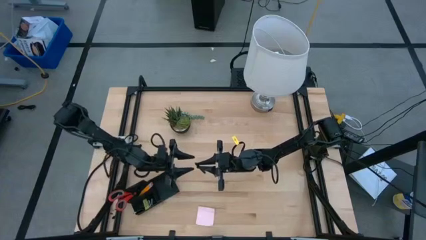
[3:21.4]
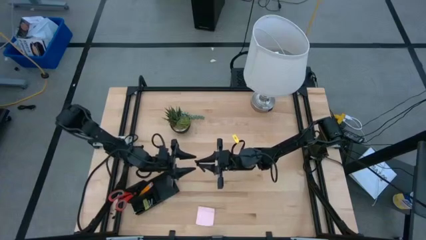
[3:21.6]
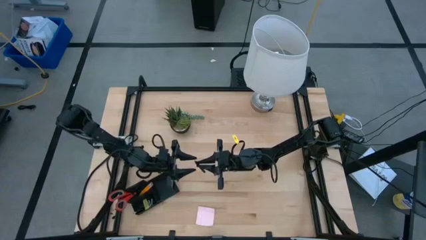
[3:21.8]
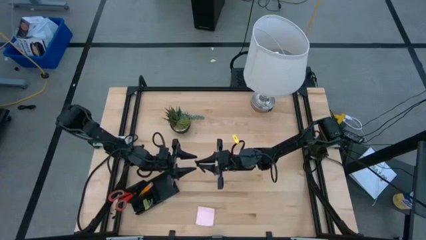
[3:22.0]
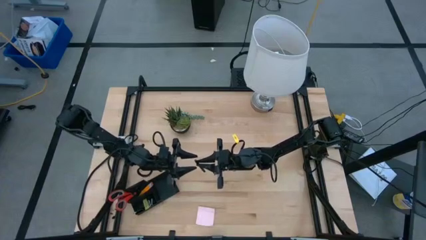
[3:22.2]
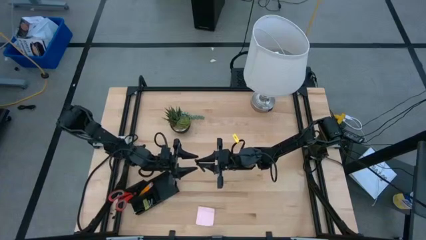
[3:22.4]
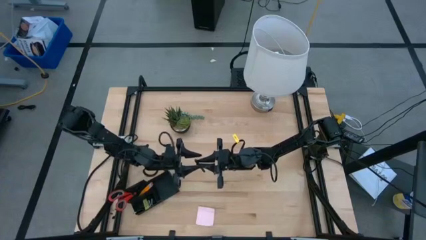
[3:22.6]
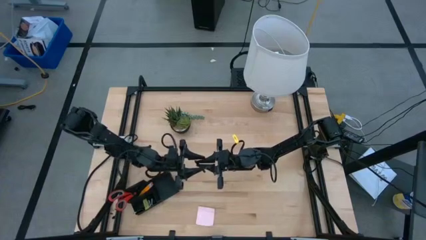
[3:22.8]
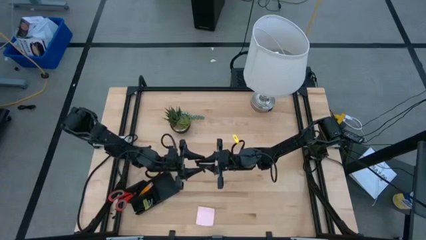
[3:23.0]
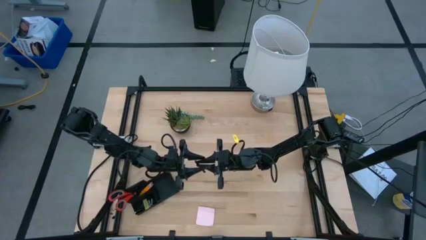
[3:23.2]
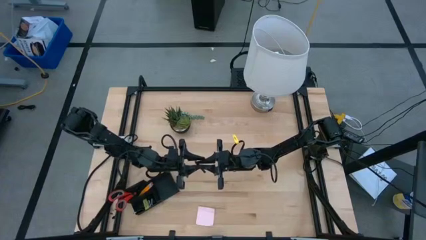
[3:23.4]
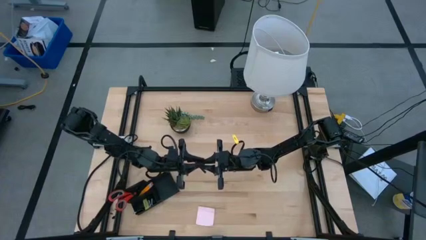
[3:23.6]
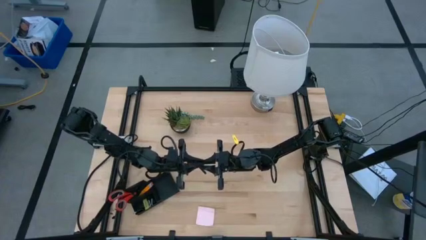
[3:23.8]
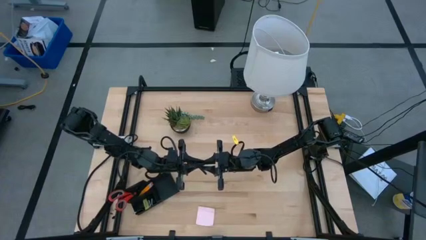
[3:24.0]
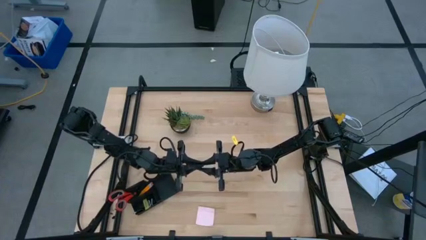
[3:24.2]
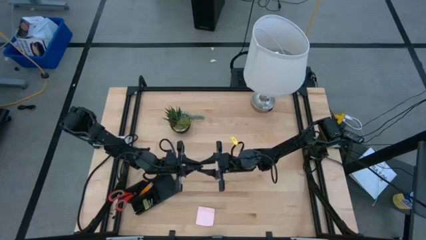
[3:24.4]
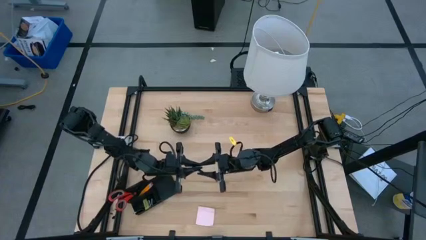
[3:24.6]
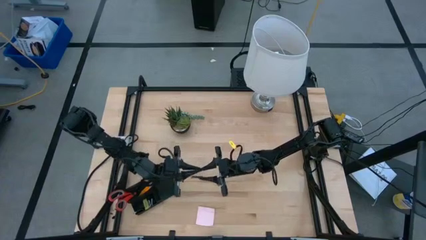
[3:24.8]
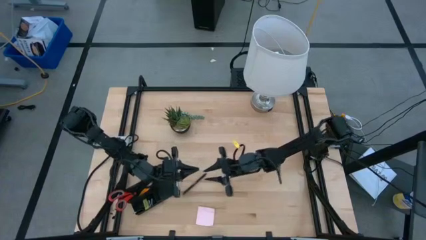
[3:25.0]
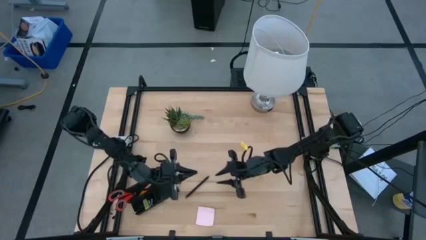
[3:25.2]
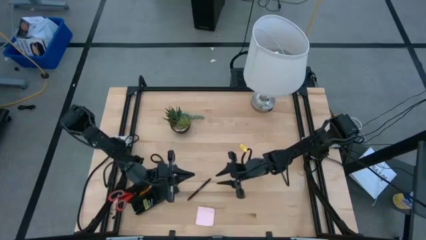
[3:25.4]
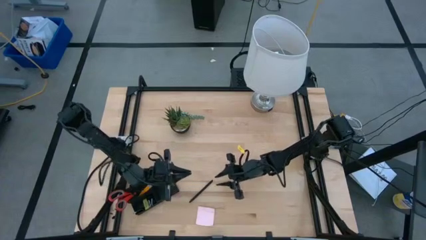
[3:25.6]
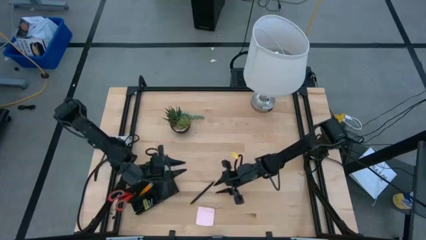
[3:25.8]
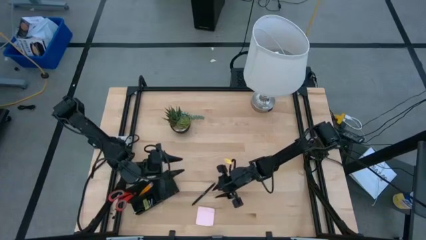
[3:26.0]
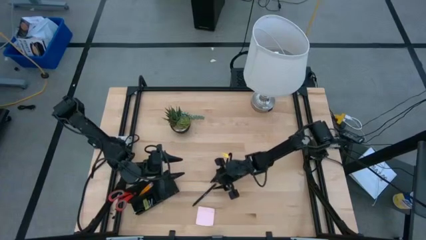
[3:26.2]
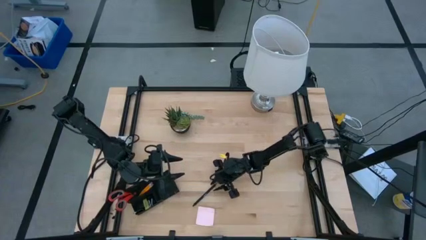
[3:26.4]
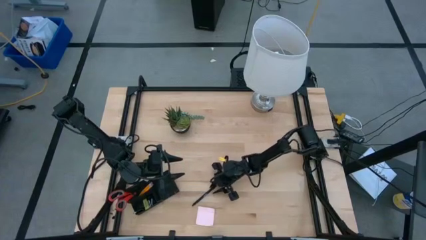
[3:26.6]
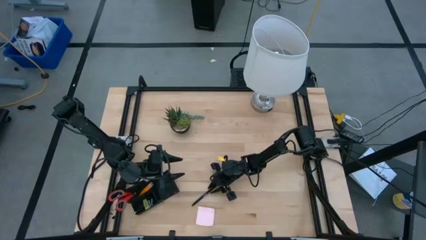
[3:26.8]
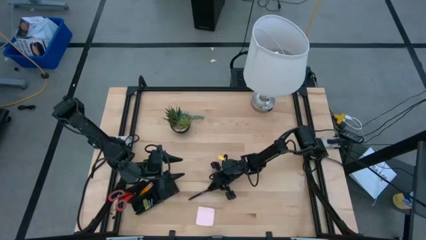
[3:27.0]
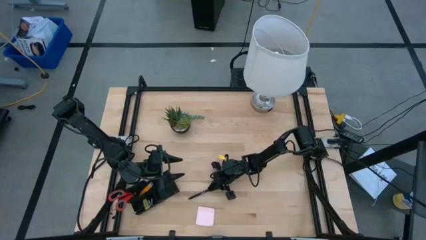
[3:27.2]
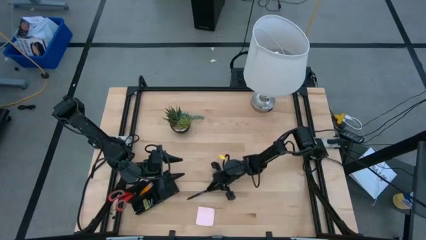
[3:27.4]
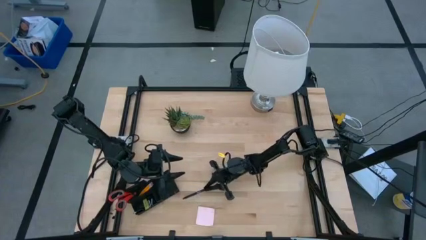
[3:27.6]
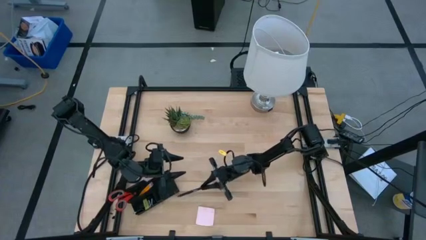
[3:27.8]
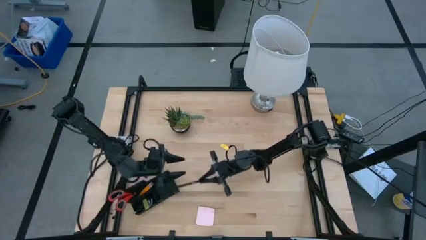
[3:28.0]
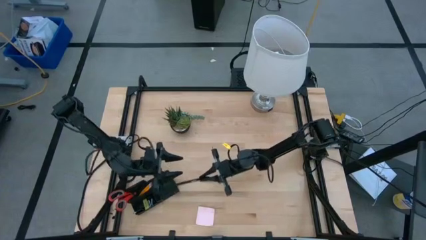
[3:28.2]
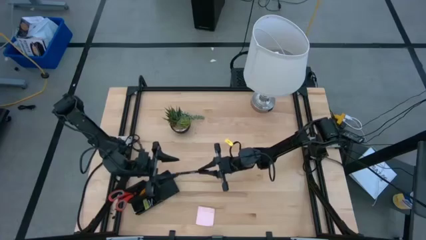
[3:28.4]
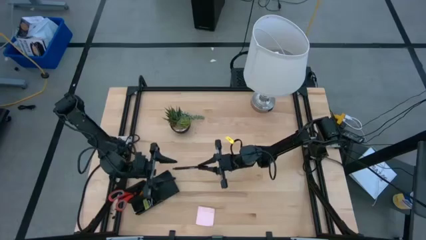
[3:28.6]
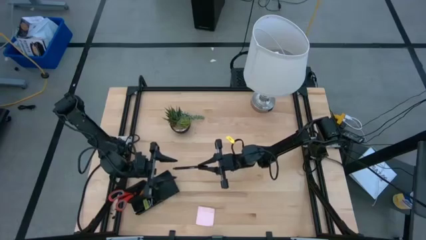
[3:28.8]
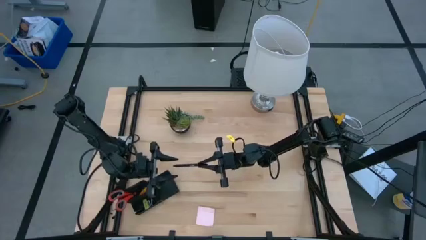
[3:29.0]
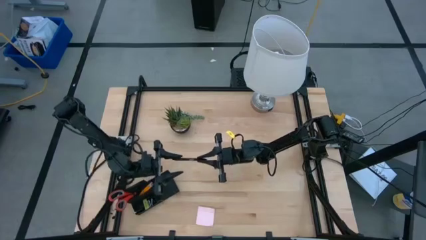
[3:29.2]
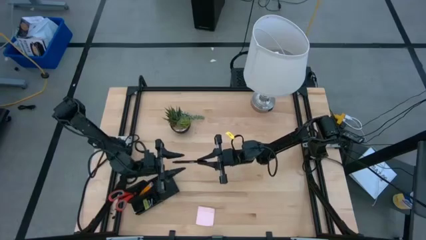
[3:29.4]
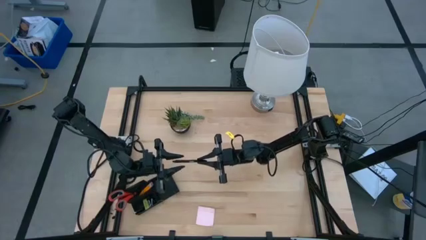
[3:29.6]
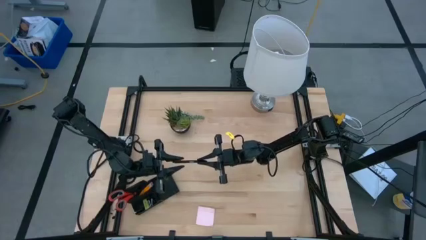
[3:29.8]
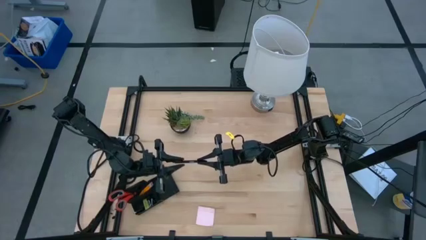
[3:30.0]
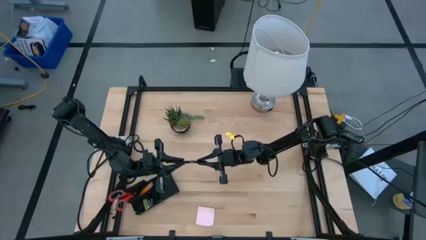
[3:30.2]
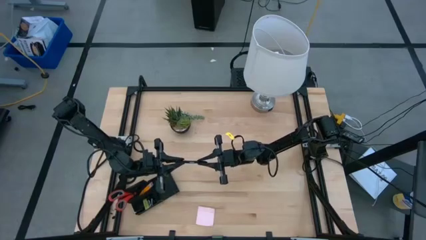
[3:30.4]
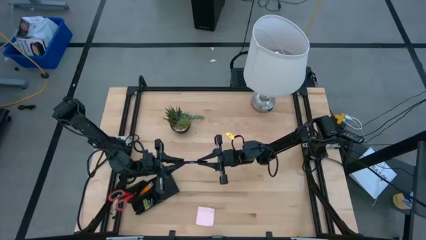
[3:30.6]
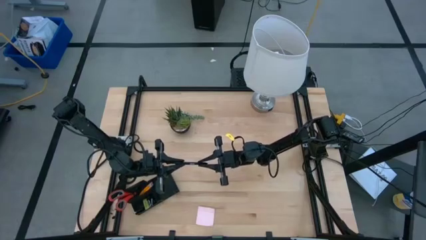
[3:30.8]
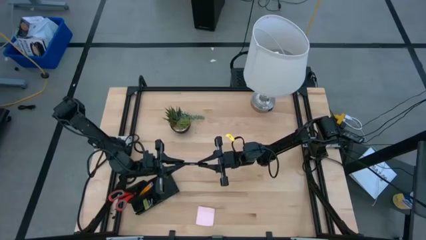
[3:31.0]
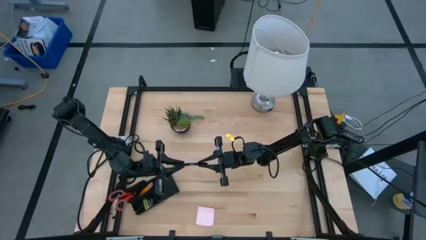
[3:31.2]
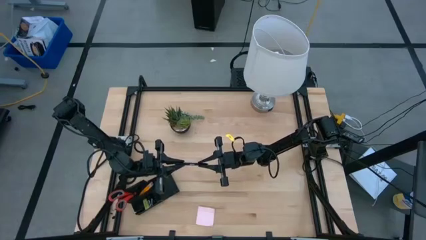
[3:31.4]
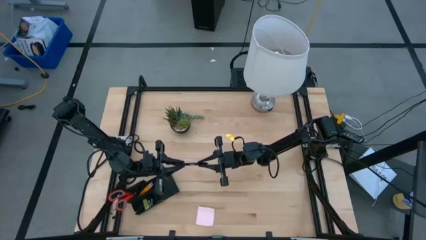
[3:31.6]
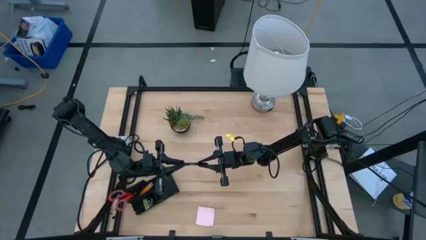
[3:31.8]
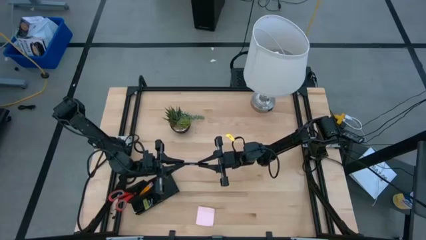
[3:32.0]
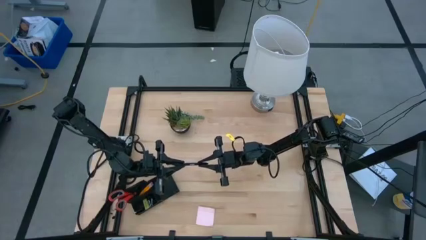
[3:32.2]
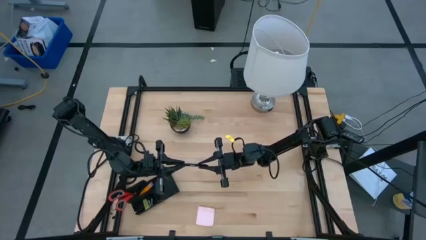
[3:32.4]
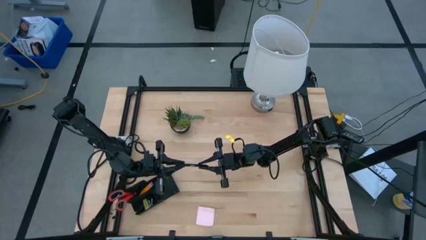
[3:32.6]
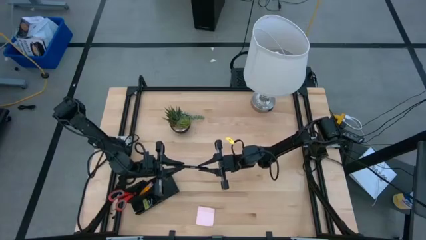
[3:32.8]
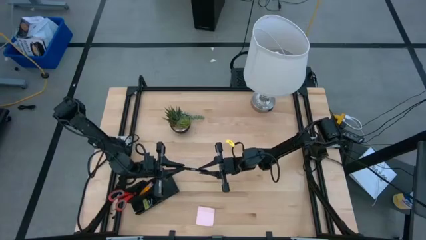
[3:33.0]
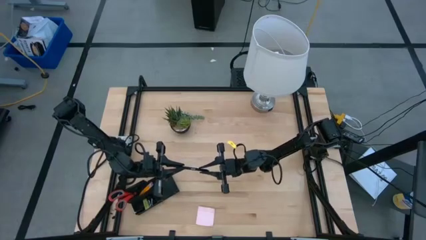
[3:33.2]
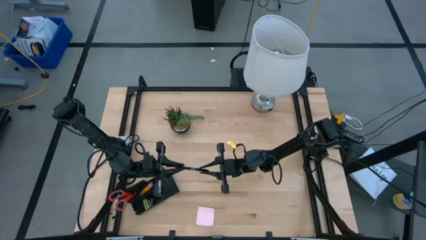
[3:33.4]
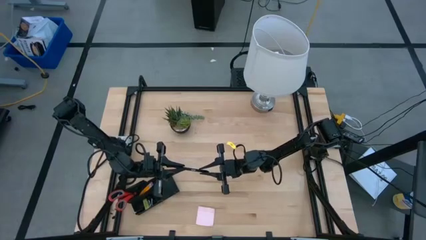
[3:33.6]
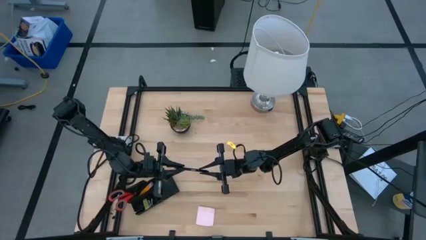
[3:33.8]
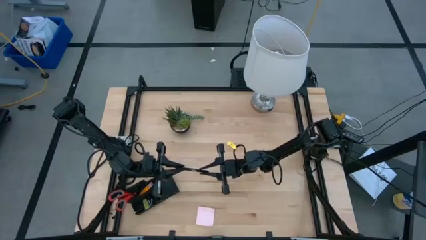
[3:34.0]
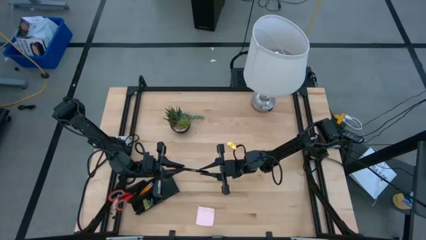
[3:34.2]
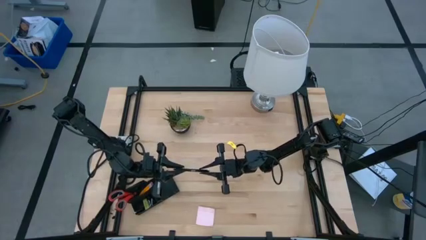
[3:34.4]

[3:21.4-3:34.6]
Task: Pick and place office supplies into organizer
Put the pen into the top left section of the desk organizer

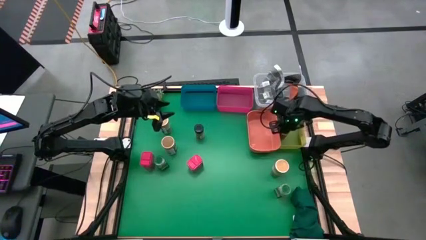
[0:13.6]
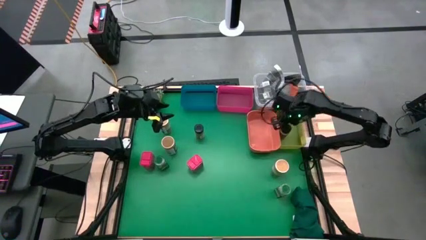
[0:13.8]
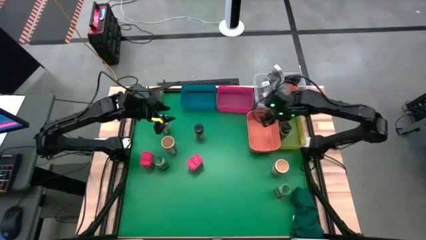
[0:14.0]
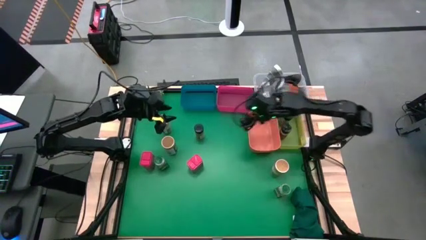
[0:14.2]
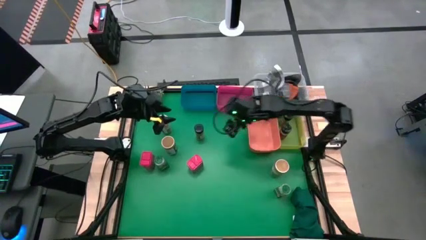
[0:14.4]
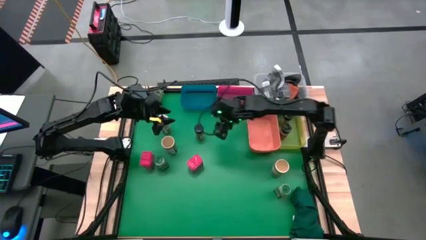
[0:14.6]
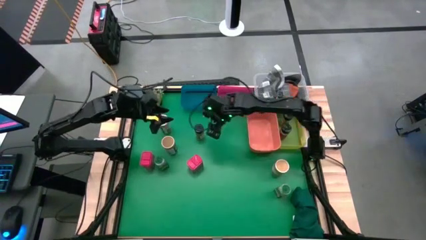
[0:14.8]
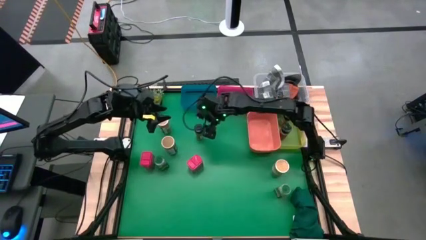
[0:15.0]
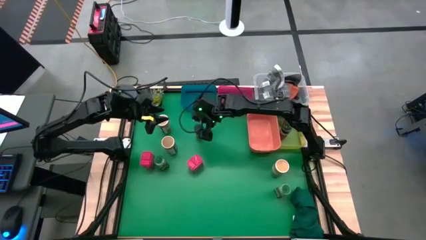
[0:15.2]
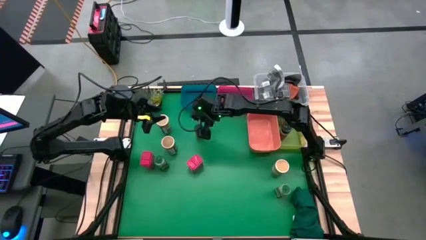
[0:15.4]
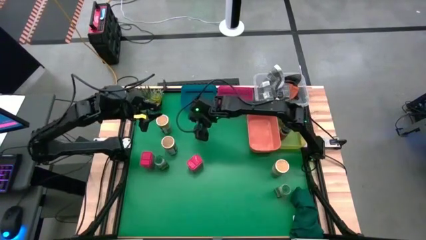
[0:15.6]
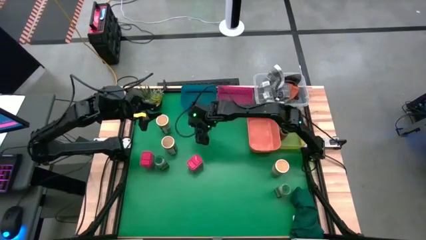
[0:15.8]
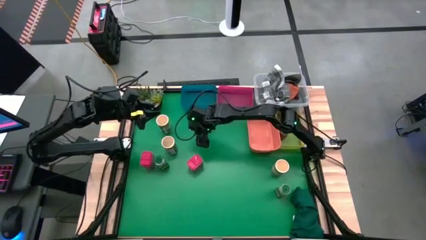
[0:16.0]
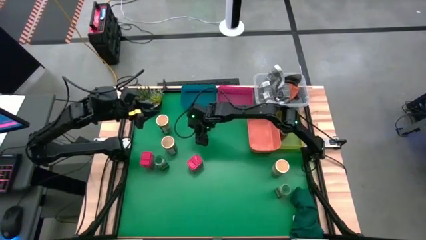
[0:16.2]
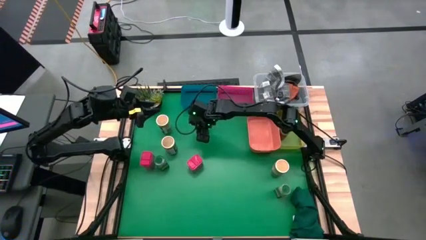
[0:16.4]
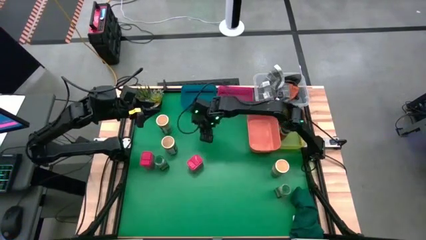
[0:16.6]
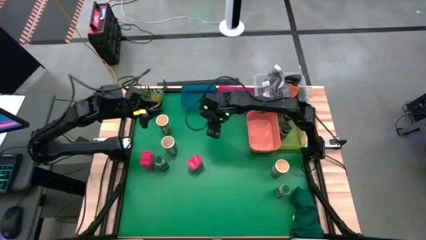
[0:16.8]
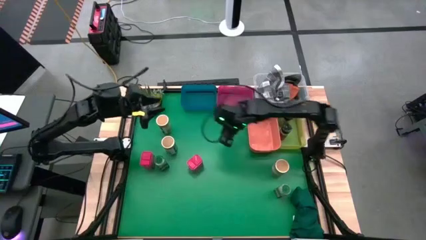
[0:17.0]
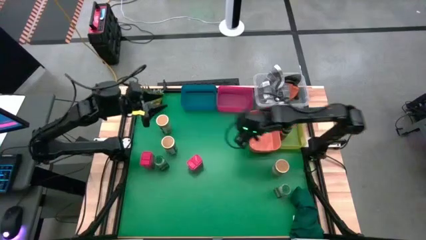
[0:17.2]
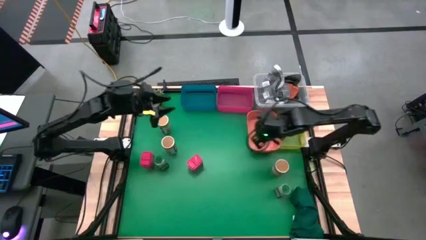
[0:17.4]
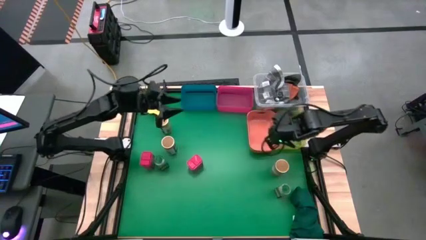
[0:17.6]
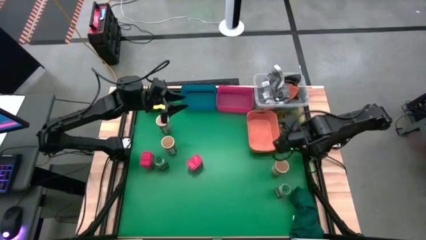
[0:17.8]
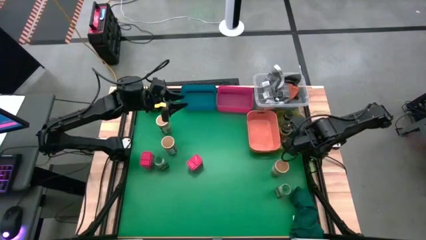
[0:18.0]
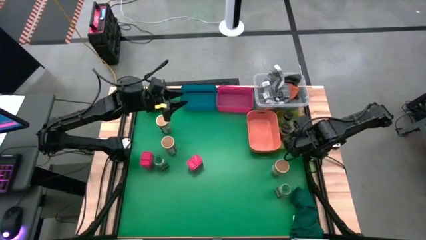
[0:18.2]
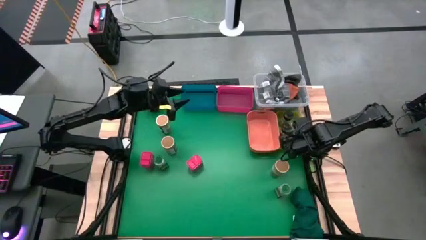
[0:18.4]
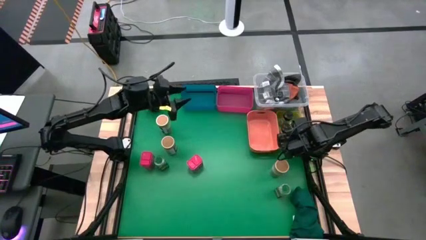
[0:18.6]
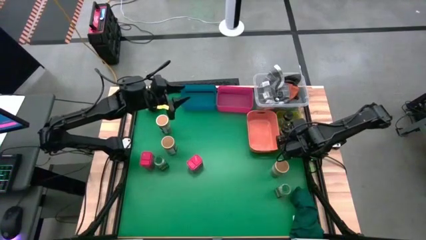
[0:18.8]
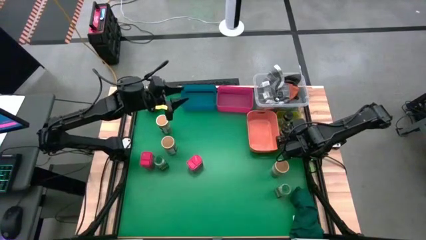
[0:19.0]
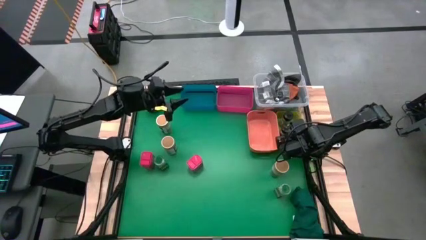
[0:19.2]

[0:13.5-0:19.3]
Task: Sort spices by type
Put the black seasoning bottle into the yellow bin
